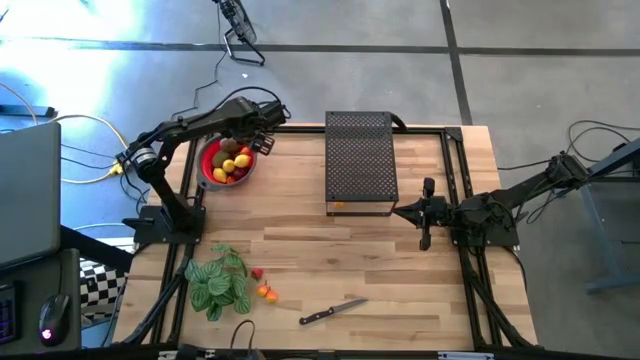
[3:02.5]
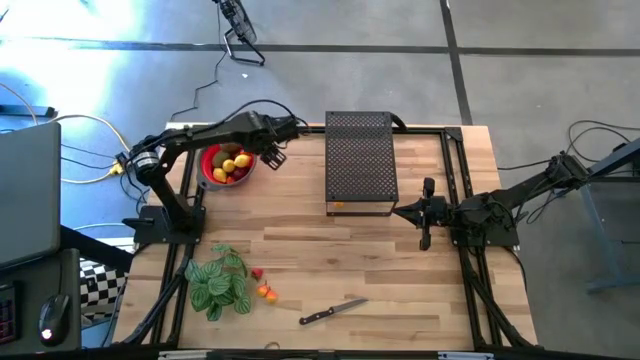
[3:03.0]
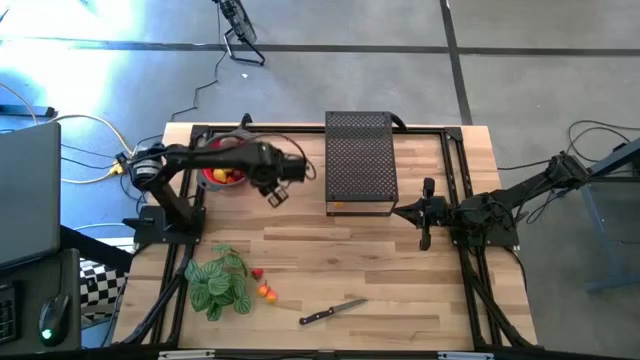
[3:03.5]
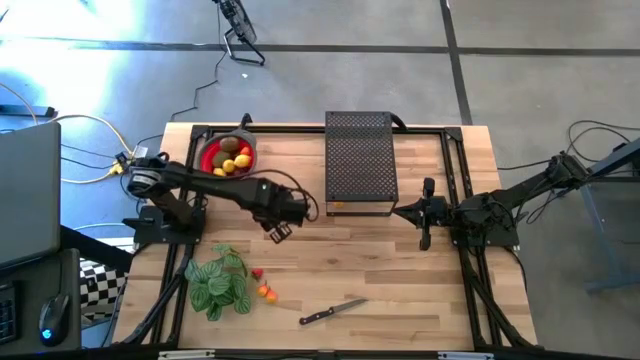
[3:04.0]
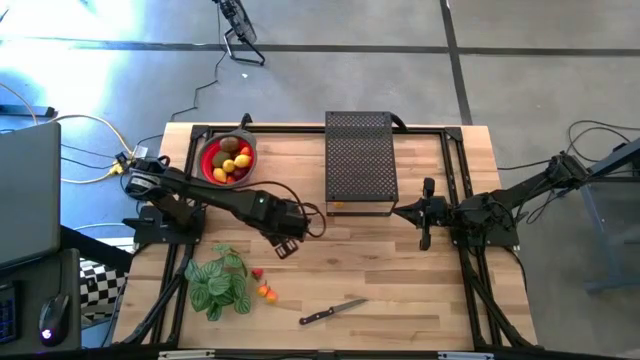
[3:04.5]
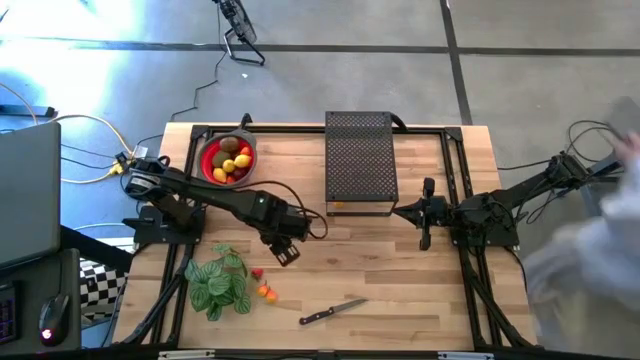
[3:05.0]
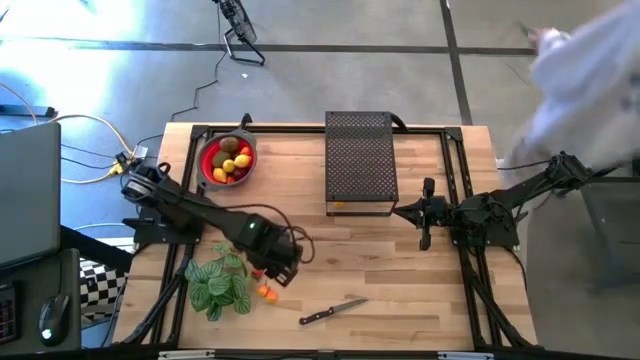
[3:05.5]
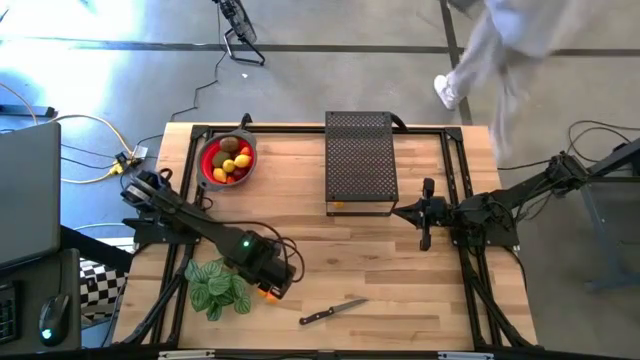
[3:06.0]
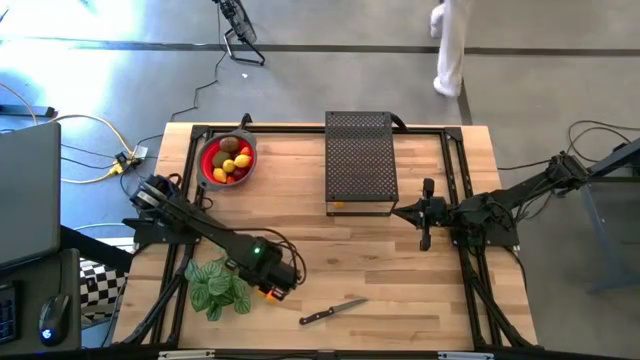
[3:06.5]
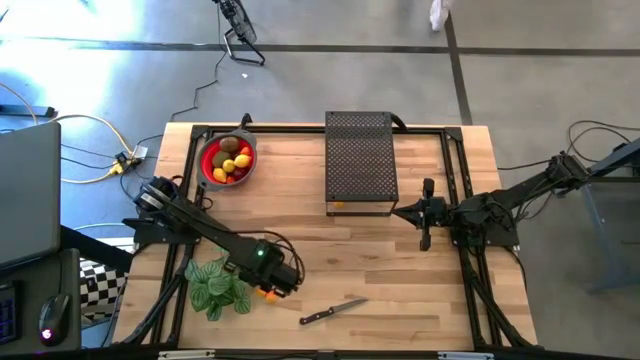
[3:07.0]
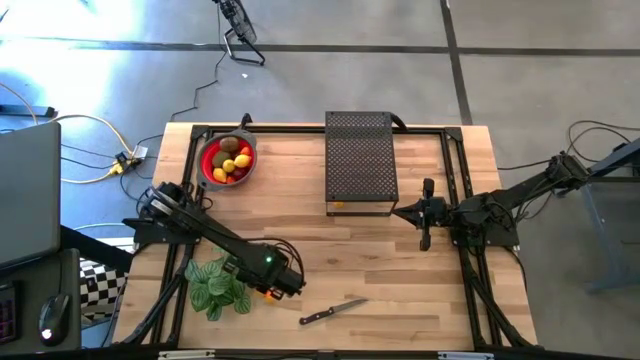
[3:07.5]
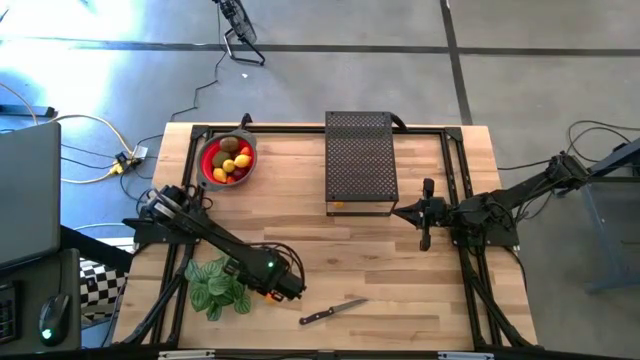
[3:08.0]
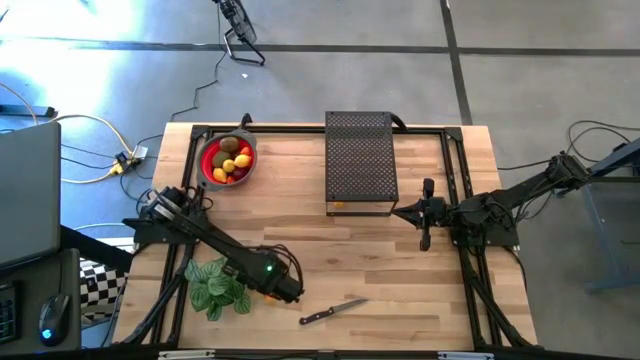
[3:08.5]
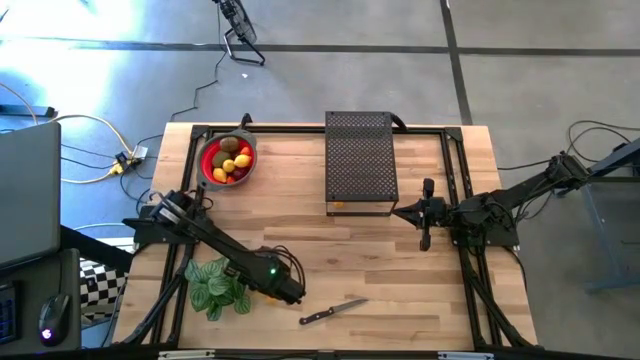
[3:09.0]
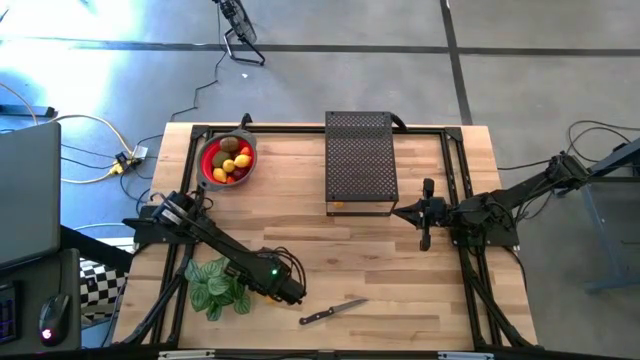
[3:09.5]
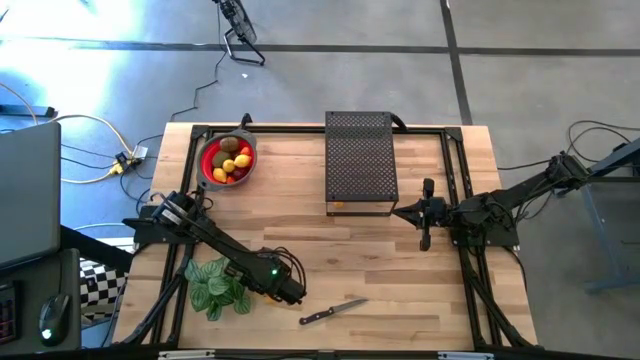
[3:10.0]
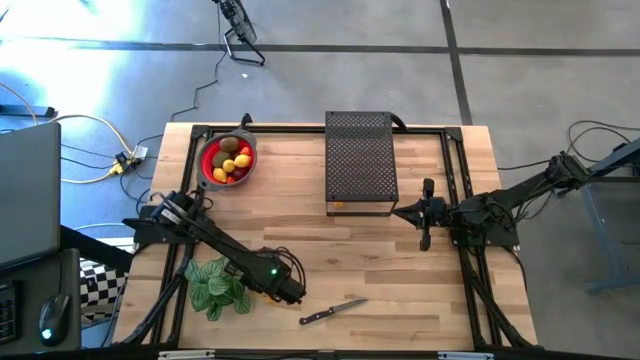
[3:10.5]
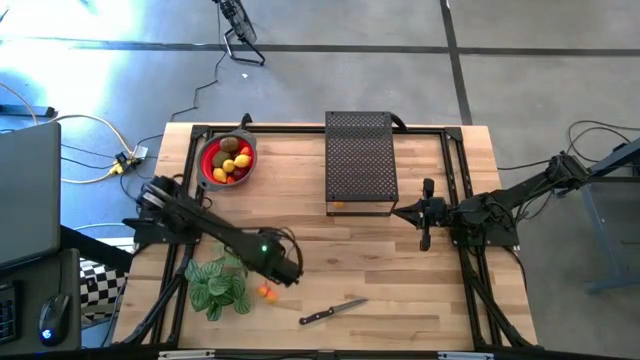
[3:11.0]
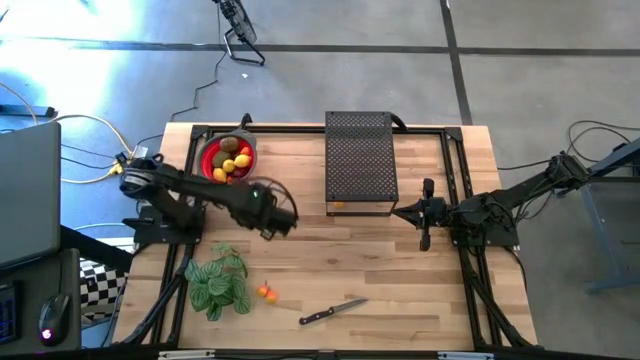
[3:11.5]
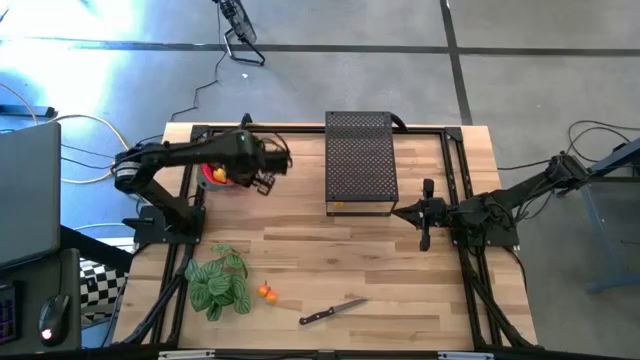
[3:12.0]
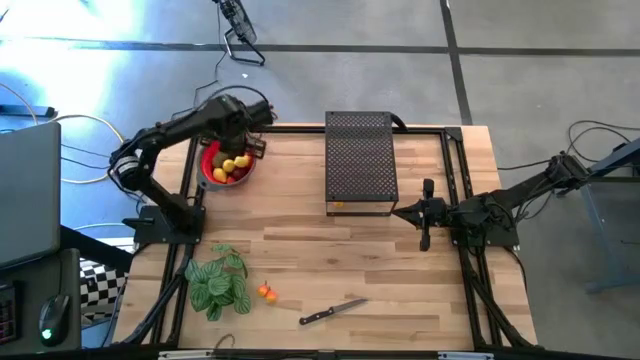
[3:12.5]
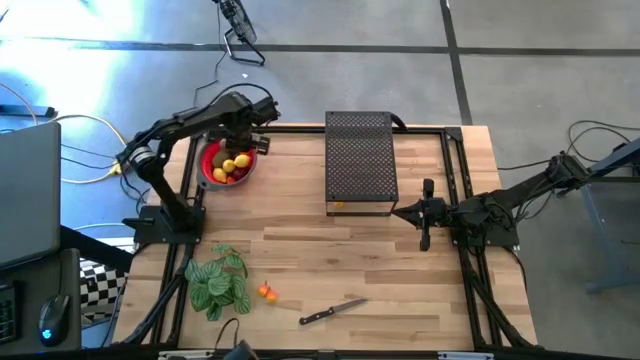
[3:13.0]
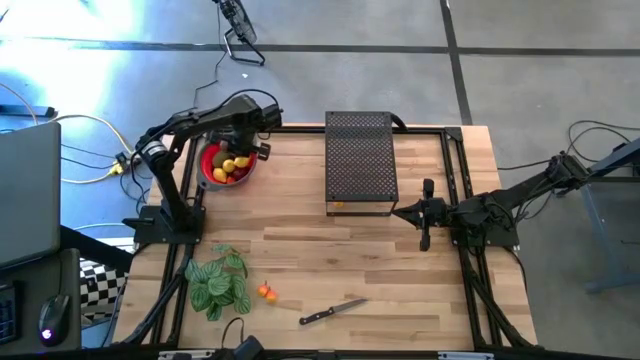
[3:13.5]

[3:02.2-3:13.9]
Task: Pick & Place Fruit
Put the red strawberry into the strainer bowl

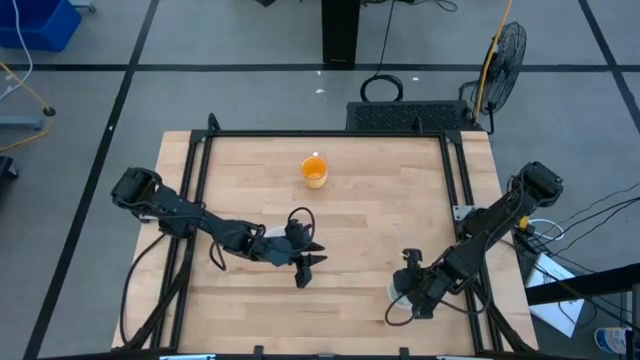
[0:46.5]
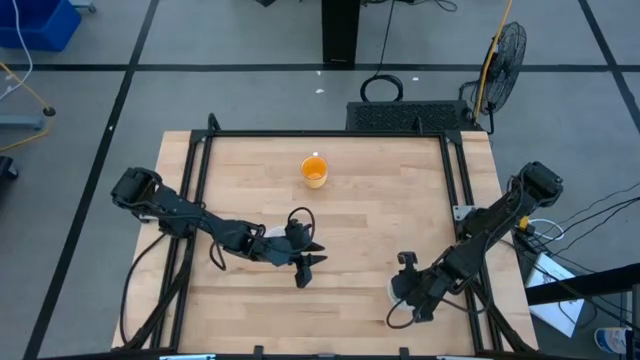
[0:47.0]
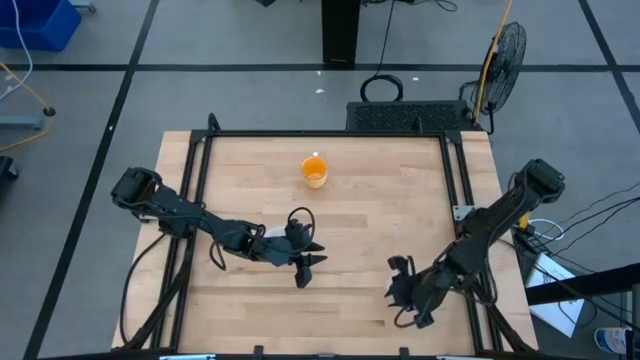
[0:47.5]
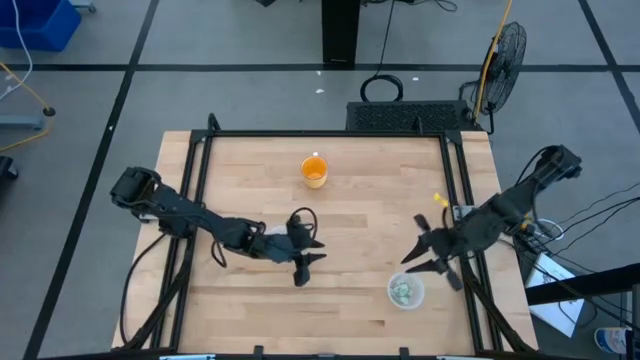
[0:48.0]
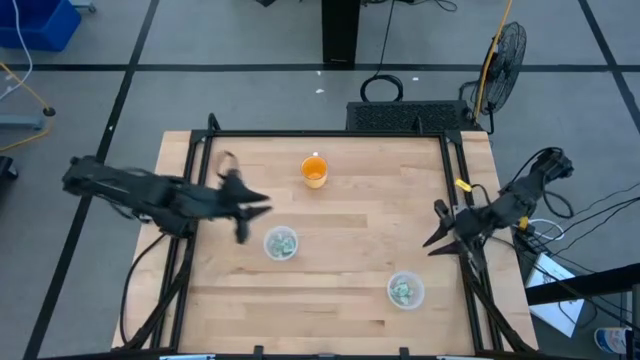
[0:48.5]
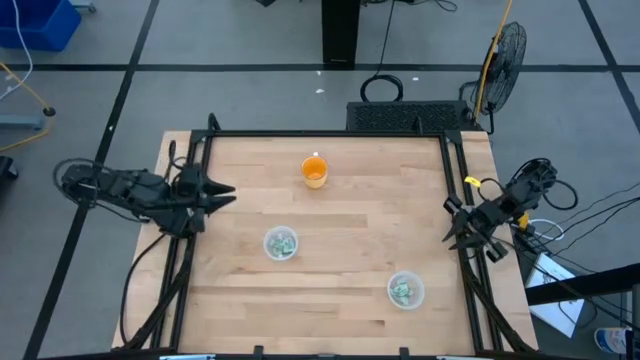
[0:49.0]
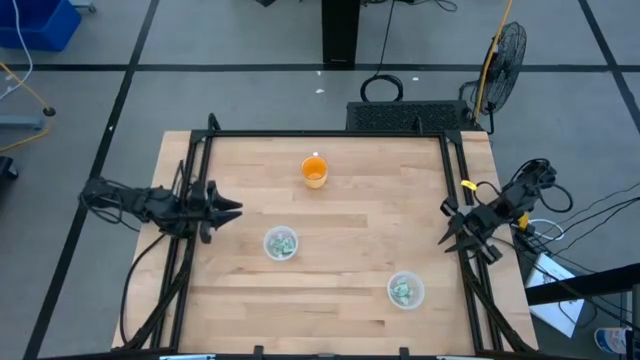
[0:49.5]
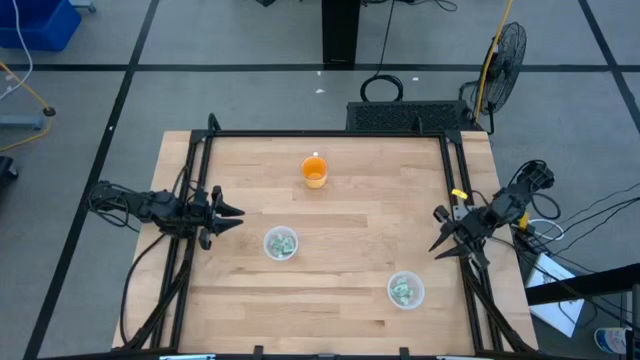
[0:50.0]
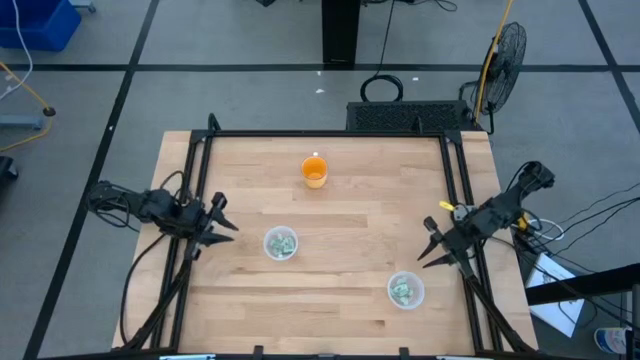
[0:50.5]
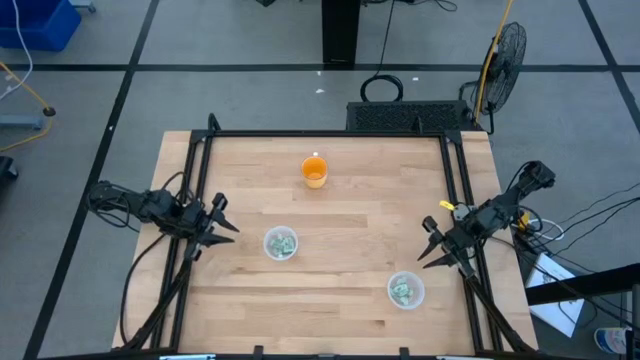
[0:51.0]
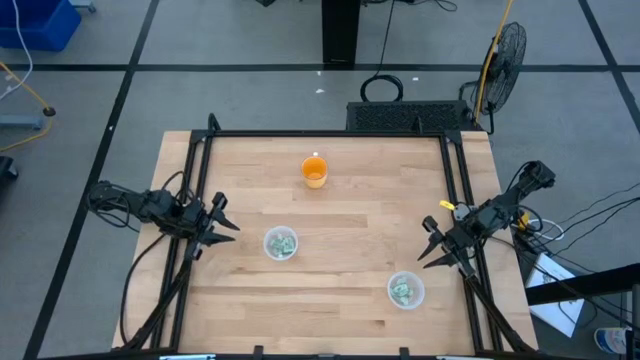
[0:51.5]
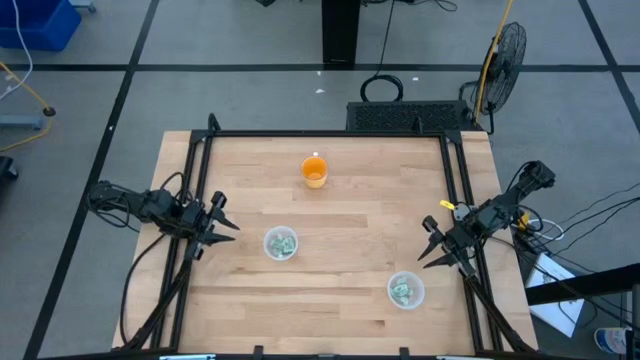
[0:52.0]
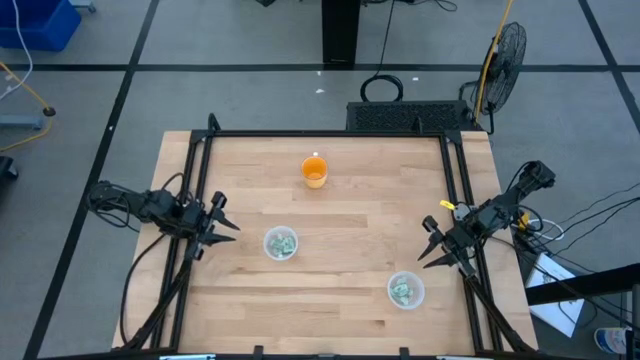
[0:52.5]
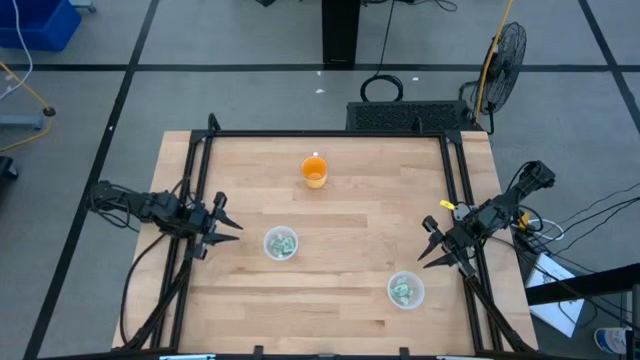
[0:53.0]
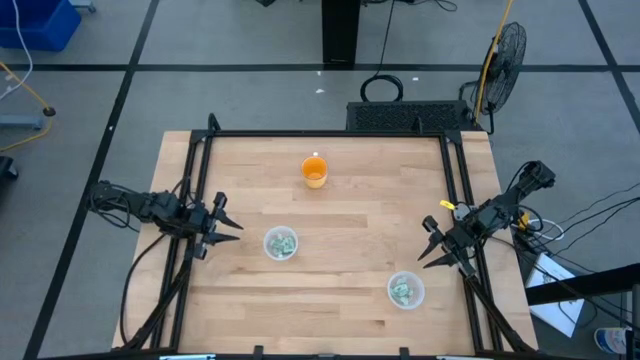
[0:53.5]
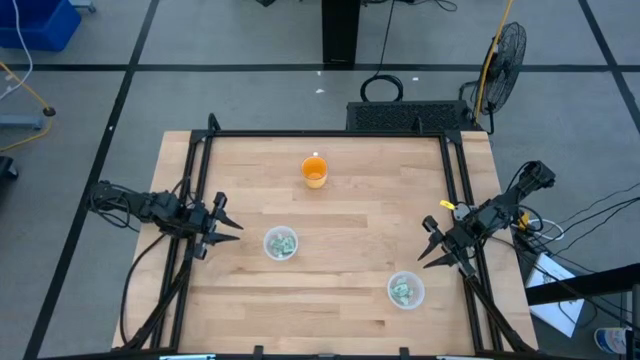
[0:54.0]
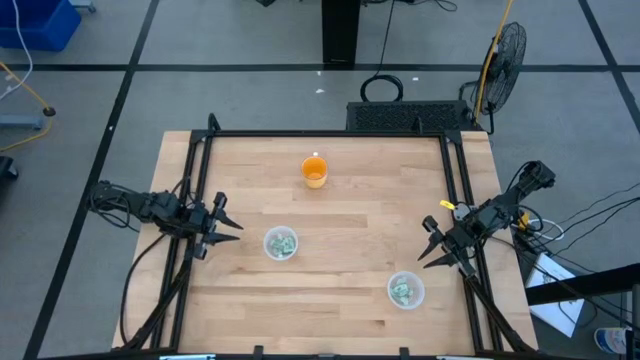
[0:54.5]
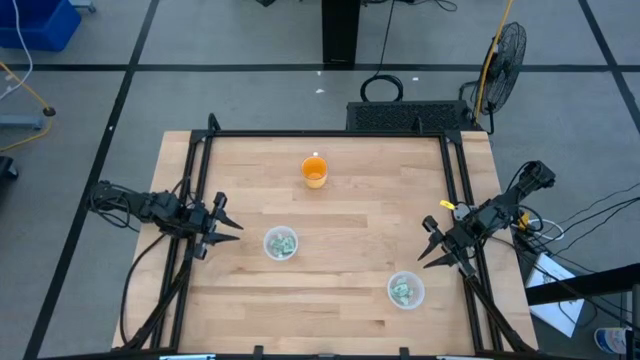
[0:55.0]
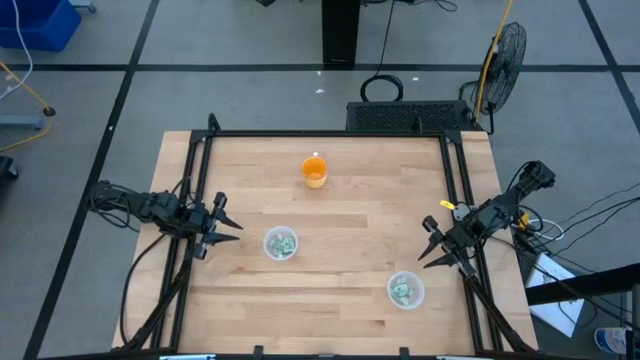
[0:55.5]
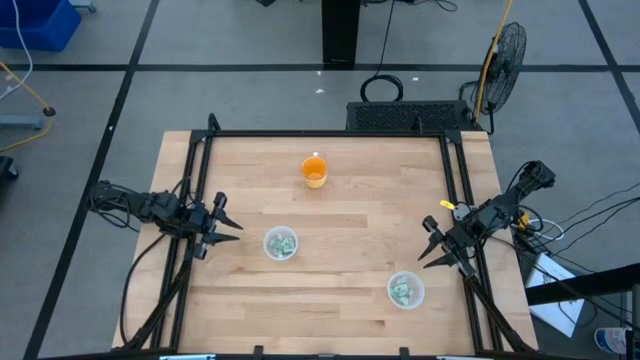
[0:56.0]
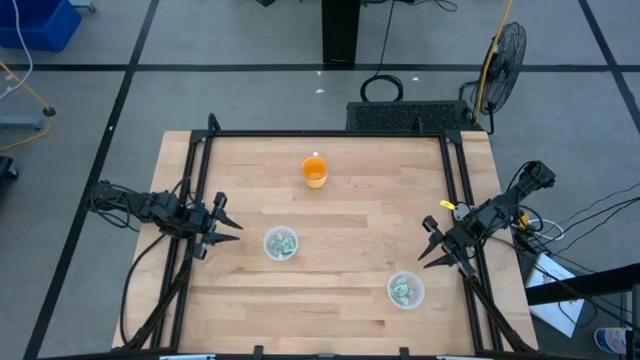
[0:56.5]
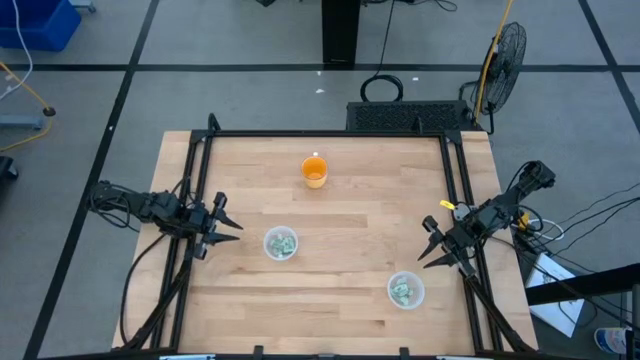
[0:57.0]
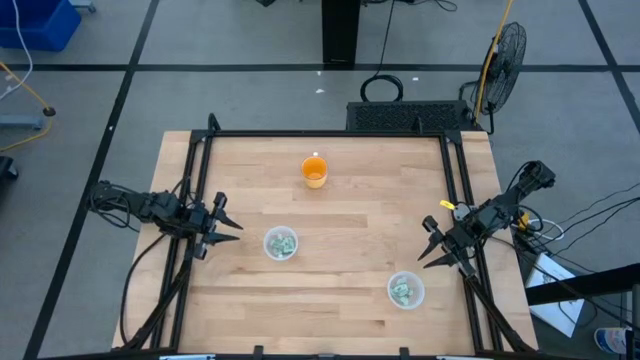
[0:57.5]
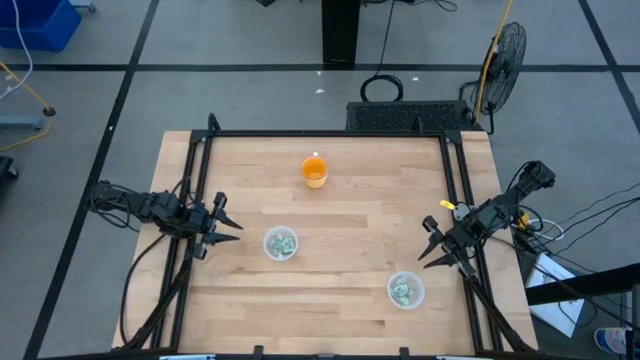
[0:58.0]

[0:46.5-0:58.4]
Task: Pick and place Stevia / Truvia into bins
Return to Home Position
